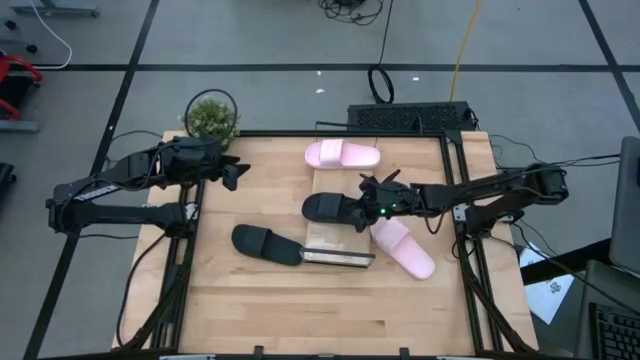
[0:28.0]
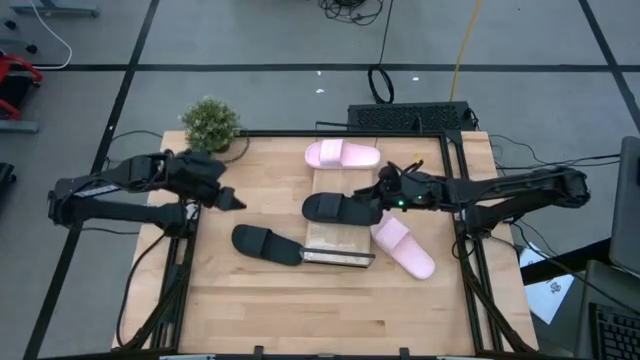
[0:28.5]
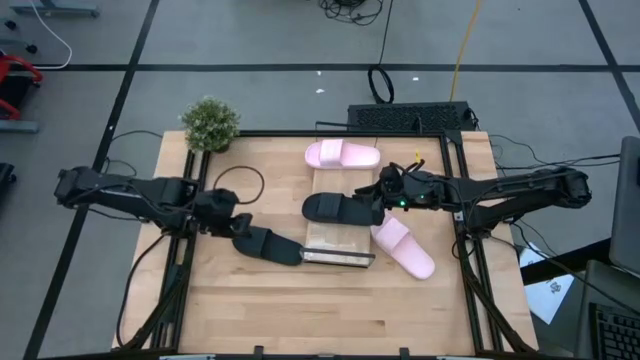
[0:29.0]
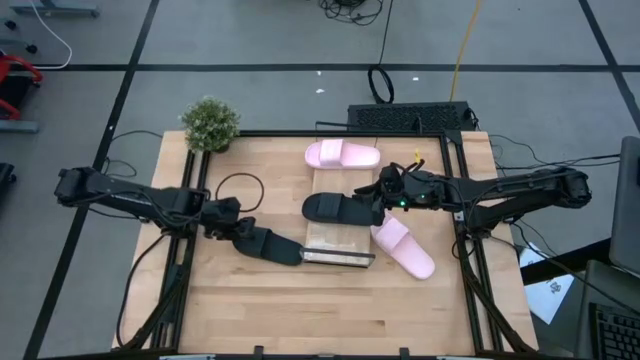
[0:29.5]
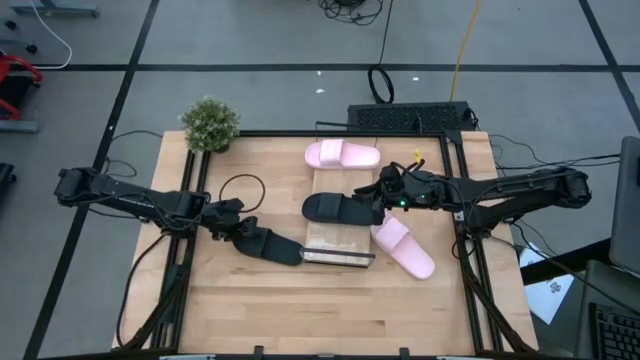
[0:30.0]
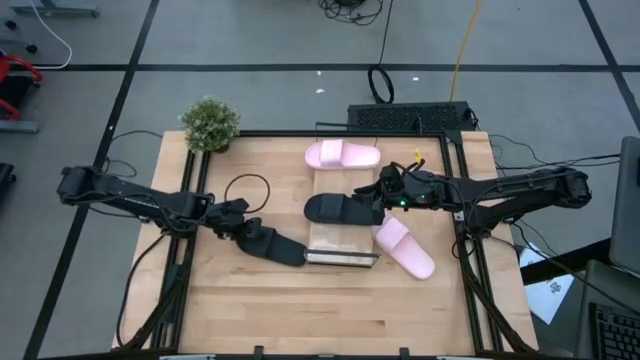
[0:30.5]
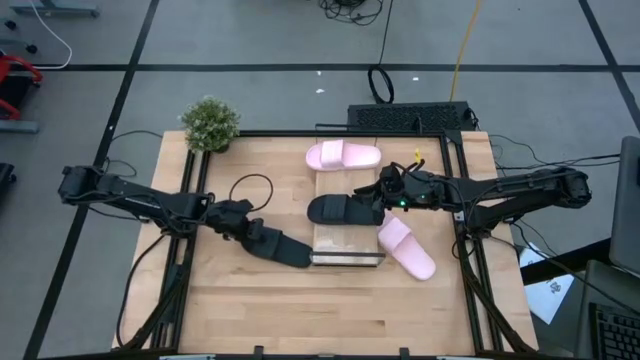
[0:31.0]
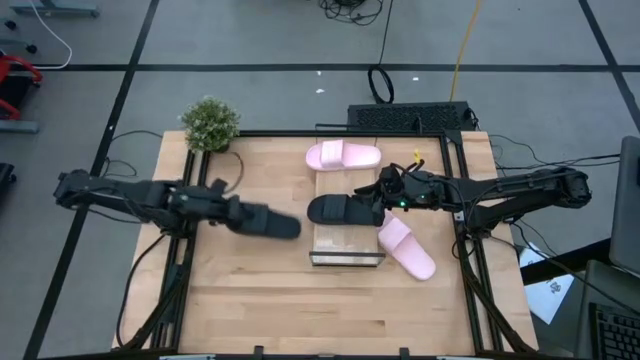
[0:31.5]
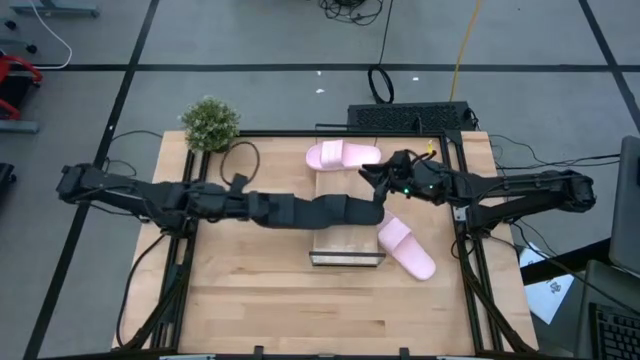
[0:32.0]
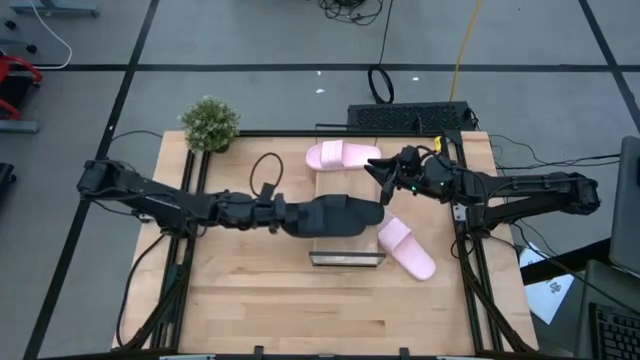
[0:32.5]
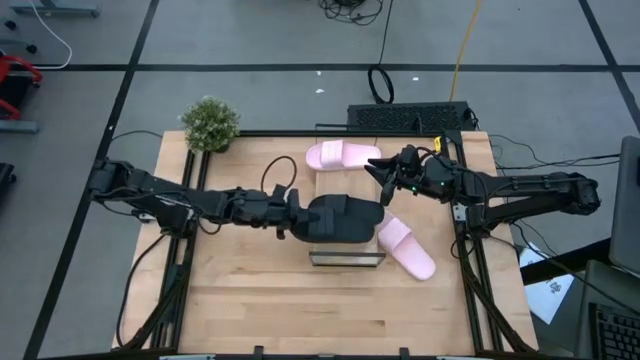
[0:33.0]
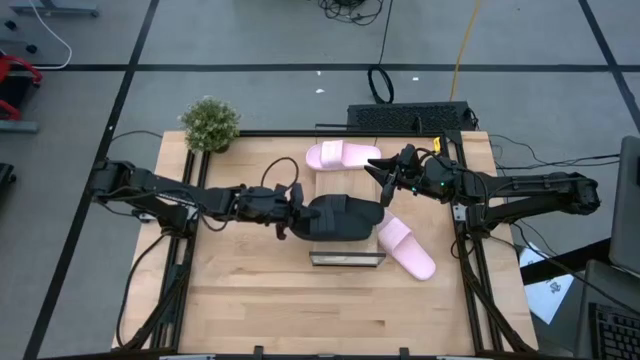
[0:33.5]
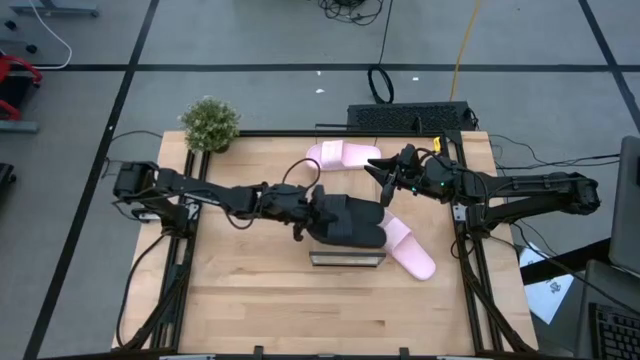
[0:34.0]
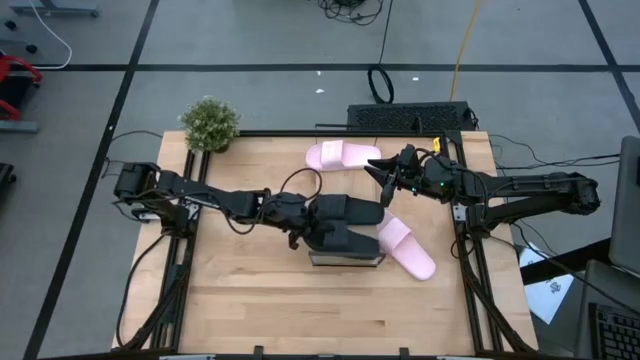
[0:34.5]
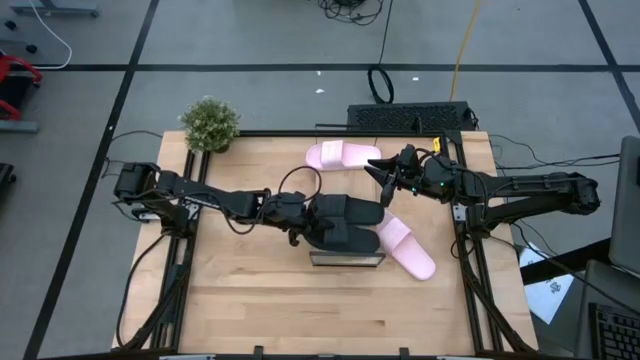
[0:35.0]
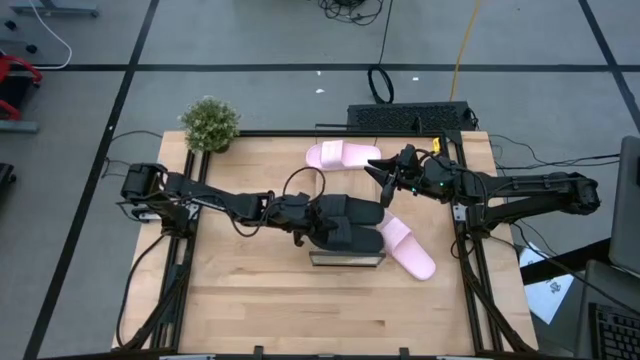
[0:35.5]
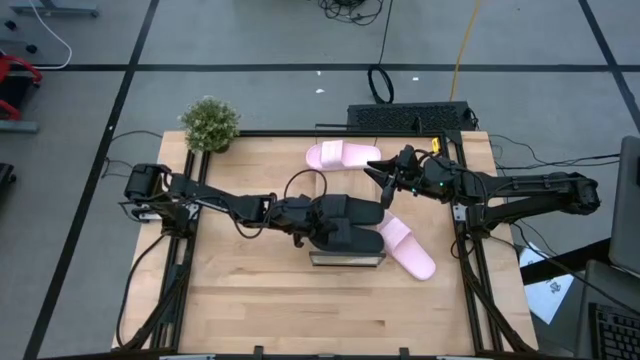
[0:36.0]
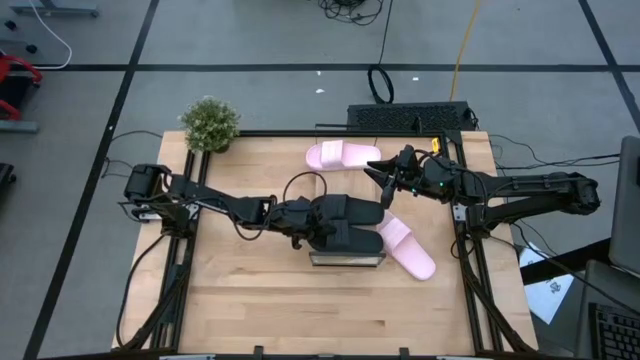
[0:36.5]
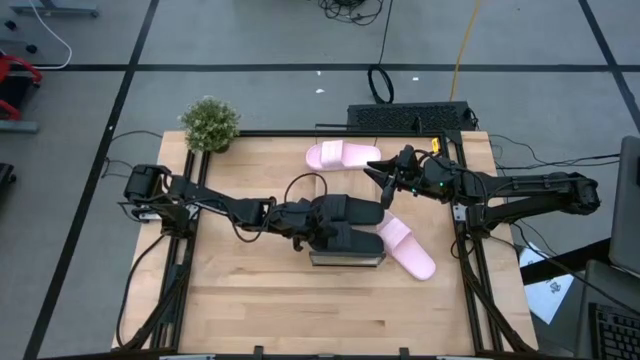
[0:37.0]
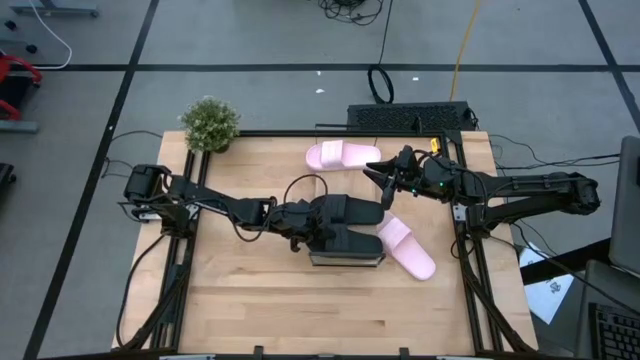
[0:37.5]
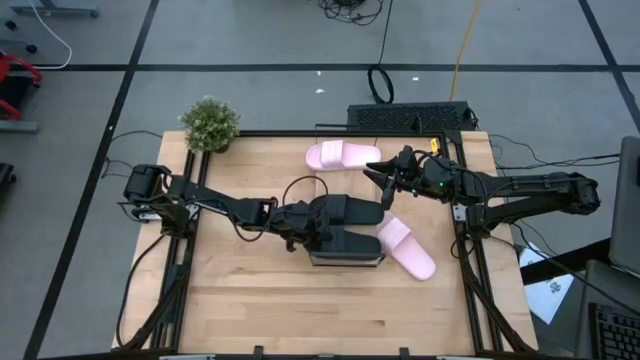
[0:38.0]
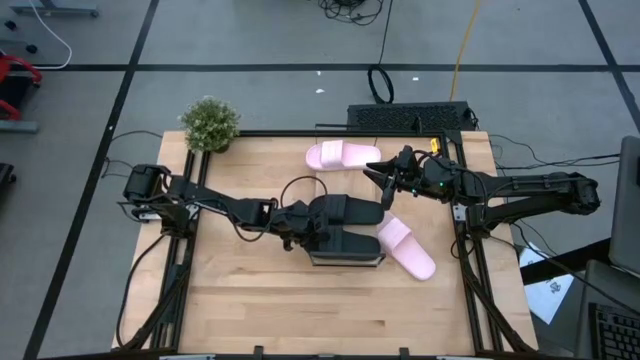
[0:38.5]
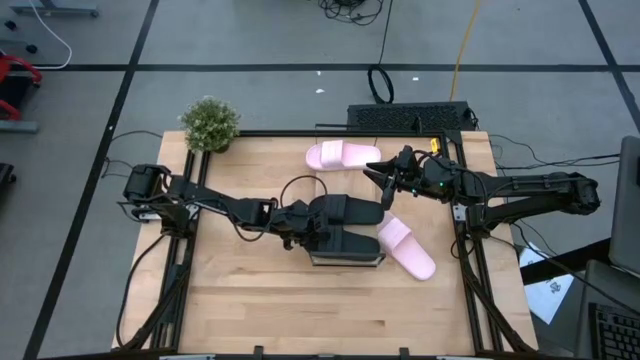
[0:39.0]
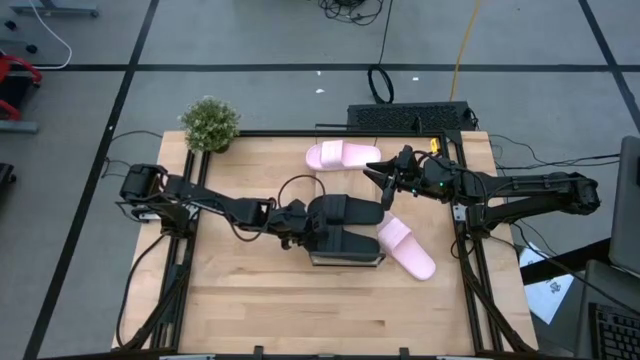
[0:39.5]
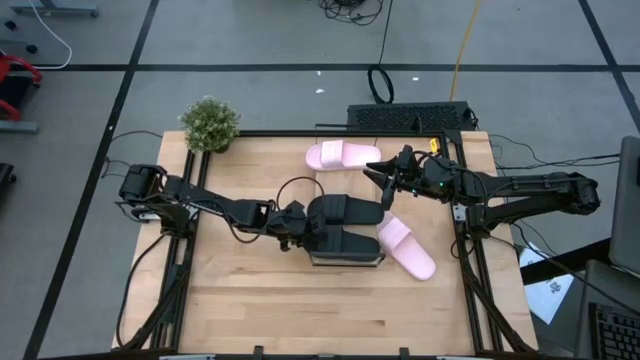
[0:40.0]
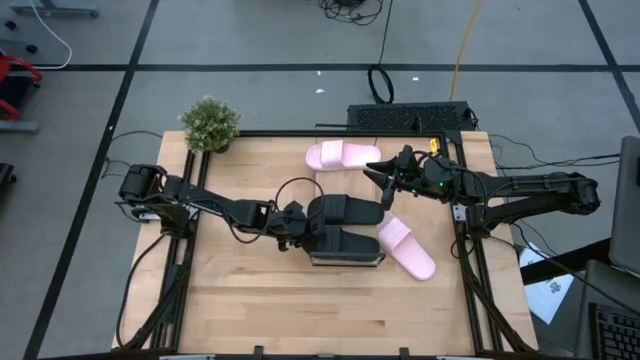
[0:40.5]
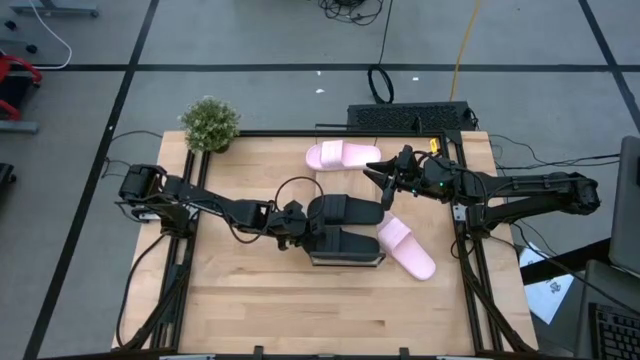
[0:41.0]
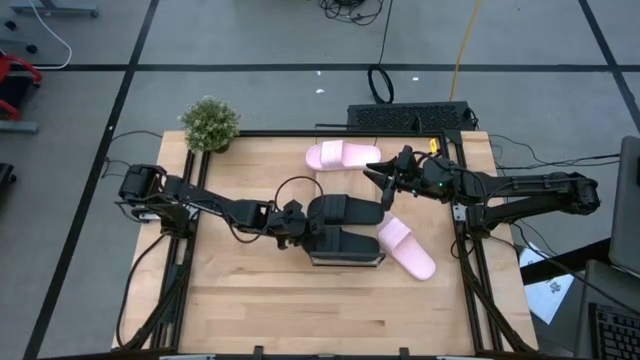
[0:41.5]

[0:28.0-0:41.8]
Task: Pick and place slides into the shelf
Put the black slipper on the shelf

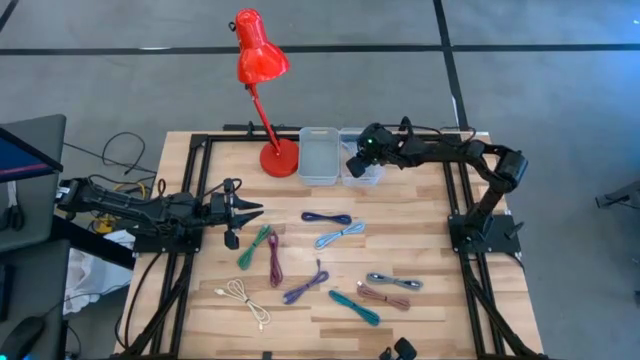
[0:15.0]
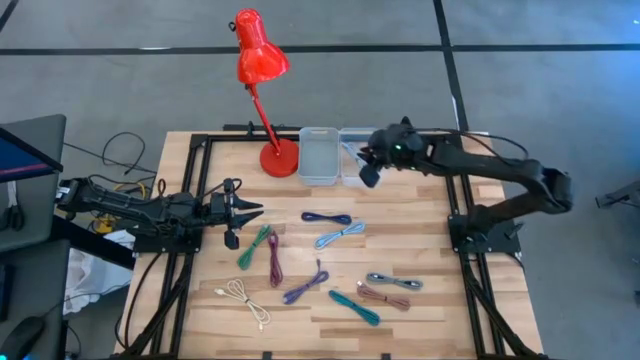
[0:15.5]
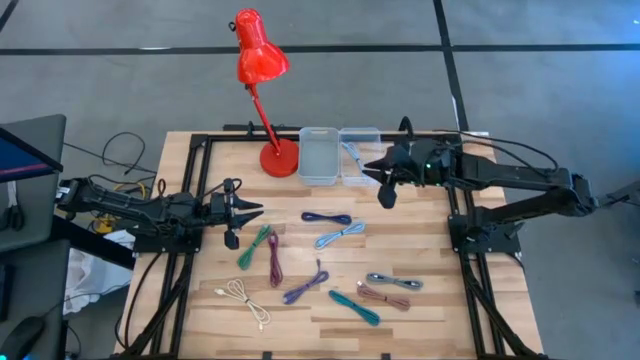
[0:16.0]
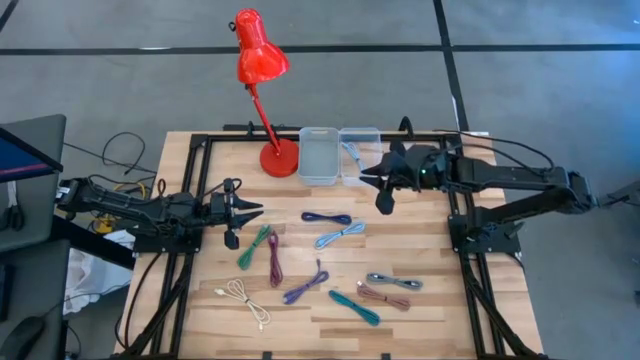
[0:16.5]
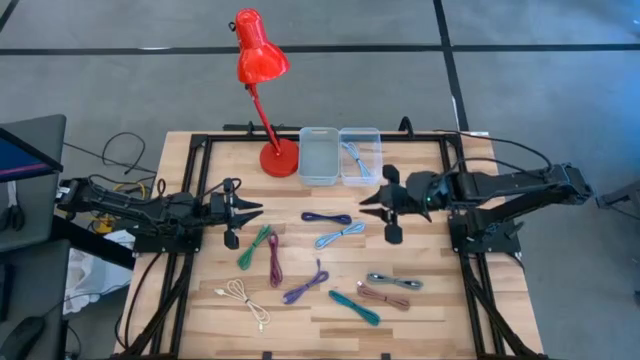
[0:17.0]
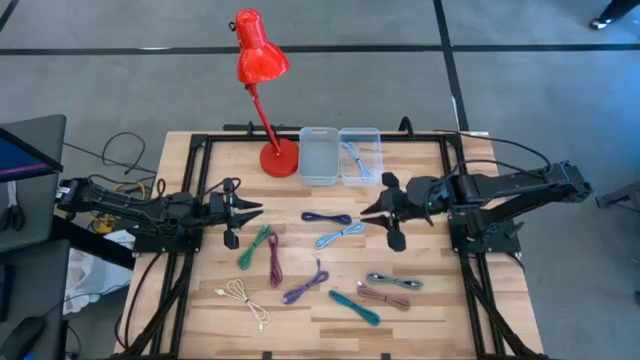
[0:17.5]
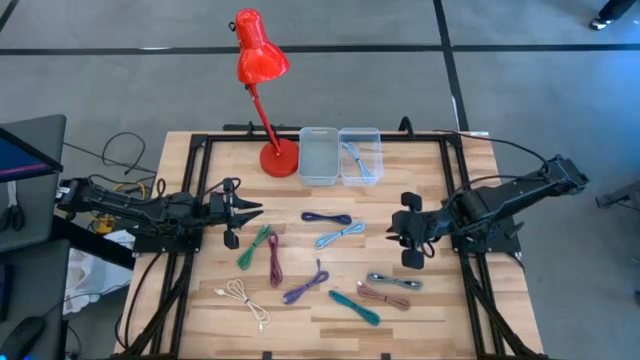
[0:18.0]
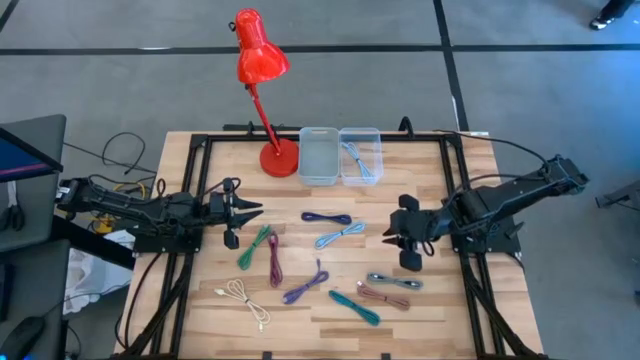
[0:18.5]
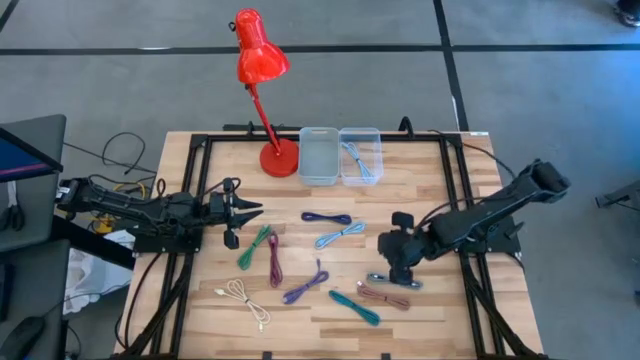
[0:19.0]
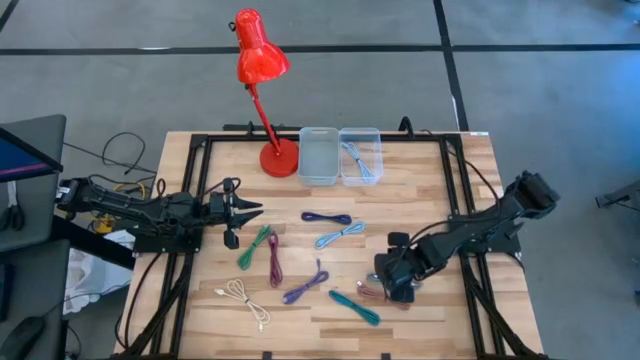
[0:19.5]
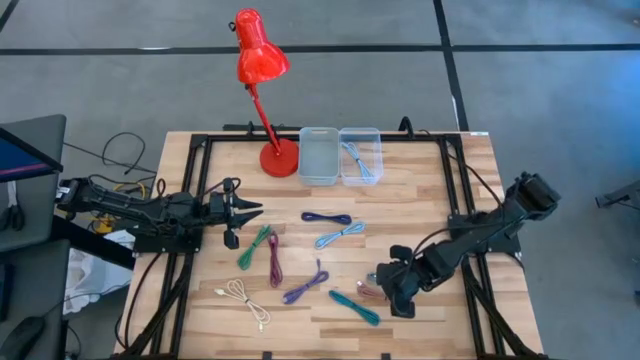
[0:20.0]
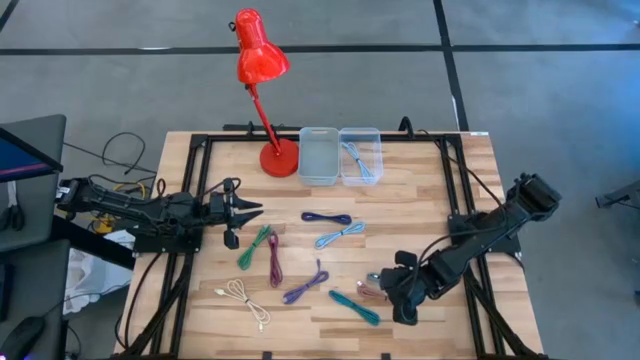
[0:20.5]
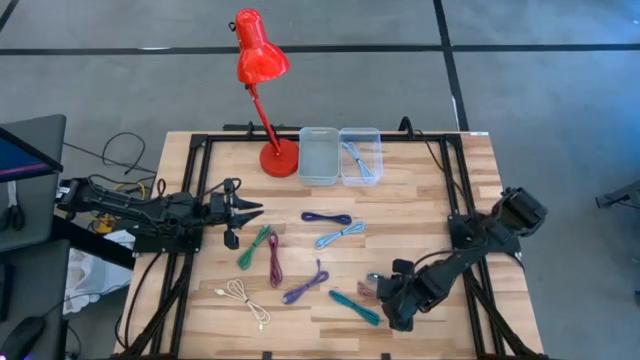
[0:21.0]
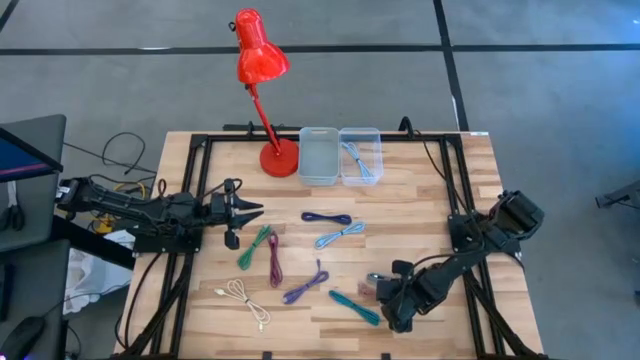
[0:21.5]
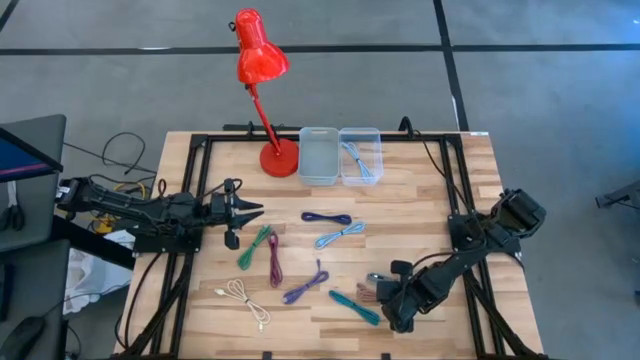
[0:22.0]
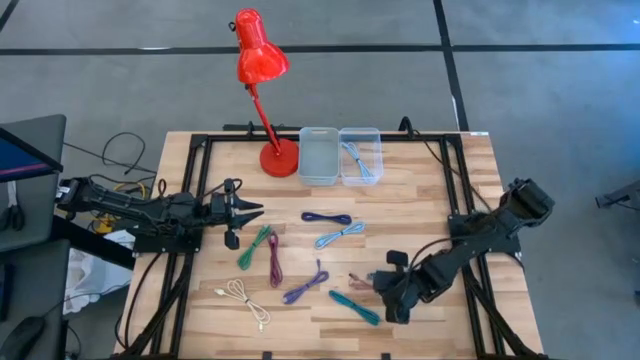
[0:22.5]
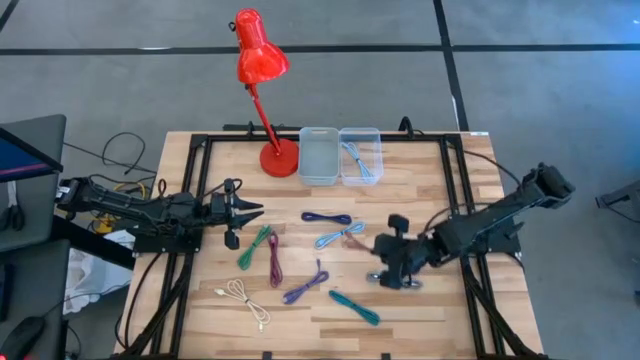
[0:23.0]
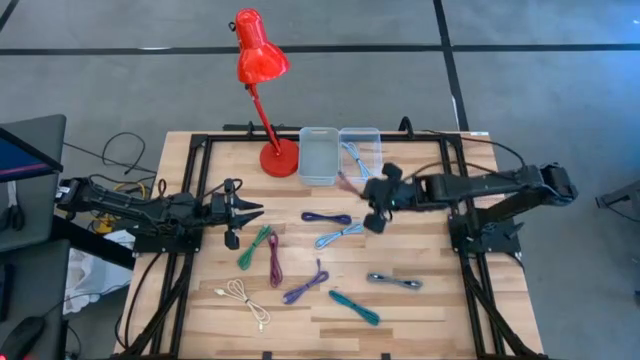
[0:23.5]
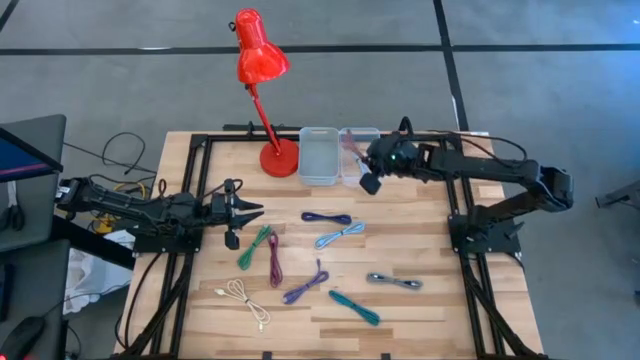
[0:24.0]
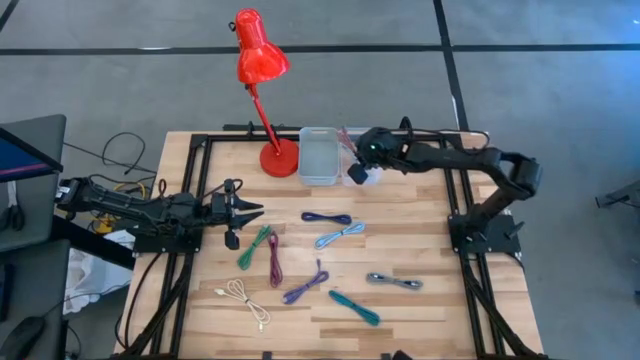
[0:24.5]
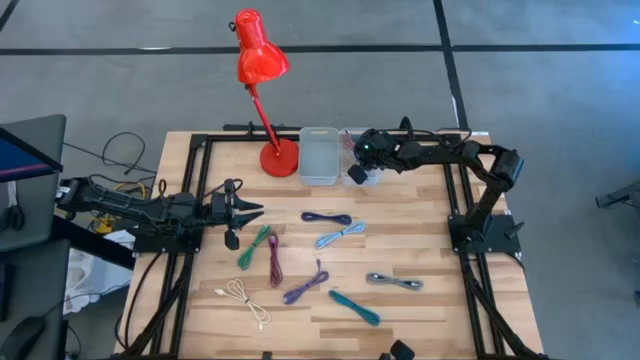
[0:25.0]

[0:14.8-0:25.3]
Task: Pick & Place USB Port
Put the pink charger cable into the transparent bin
